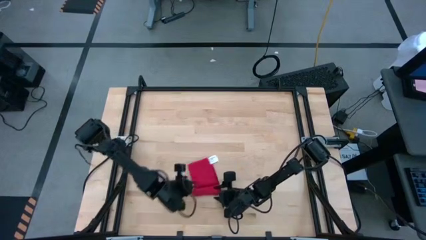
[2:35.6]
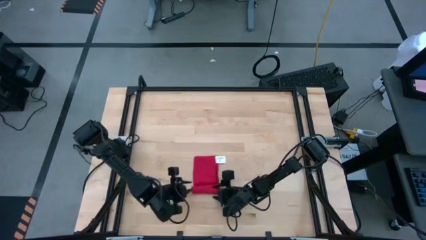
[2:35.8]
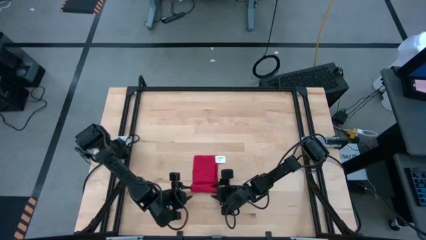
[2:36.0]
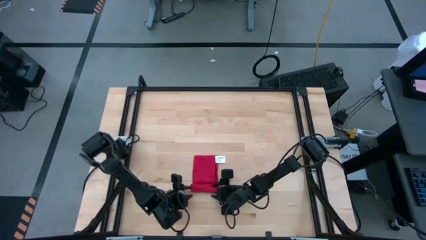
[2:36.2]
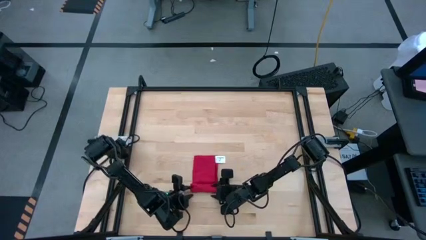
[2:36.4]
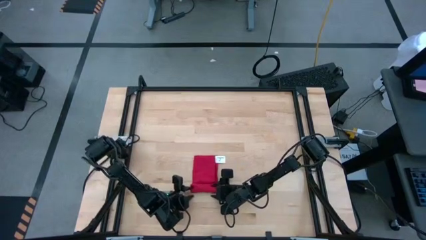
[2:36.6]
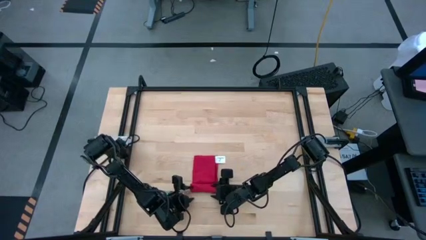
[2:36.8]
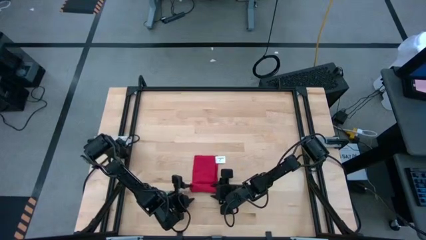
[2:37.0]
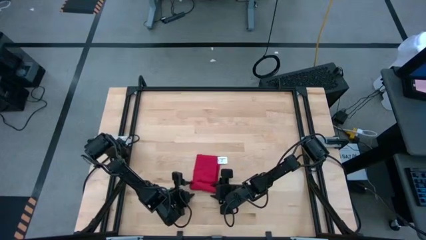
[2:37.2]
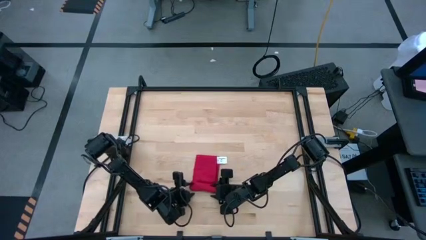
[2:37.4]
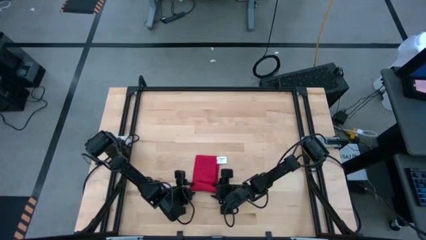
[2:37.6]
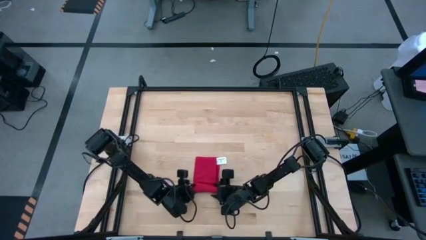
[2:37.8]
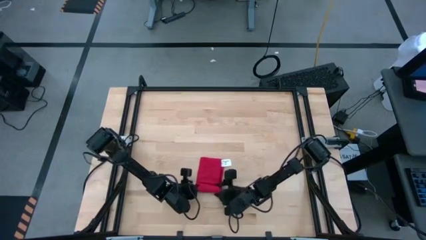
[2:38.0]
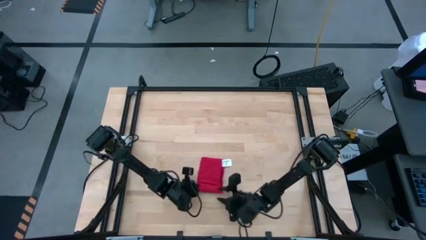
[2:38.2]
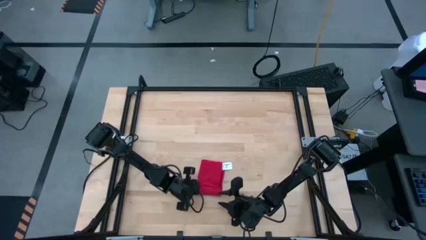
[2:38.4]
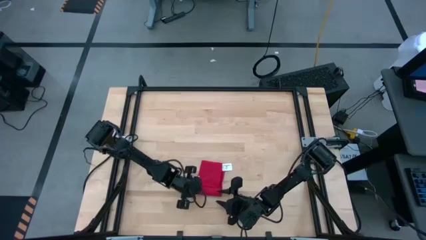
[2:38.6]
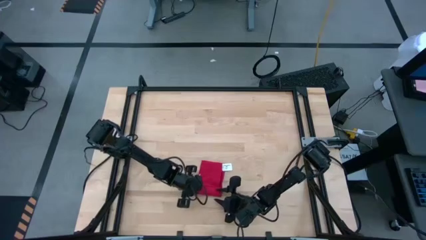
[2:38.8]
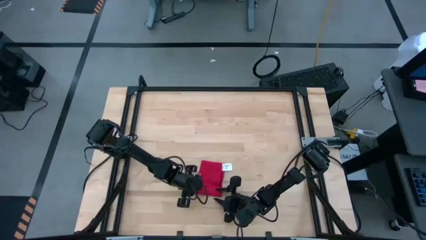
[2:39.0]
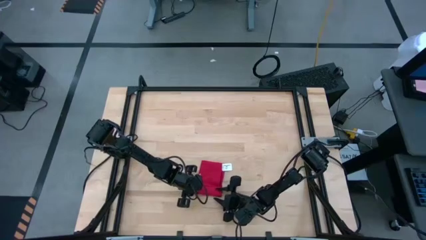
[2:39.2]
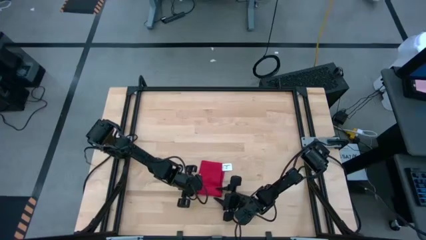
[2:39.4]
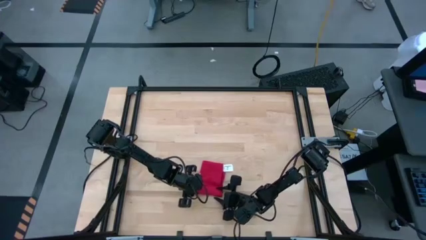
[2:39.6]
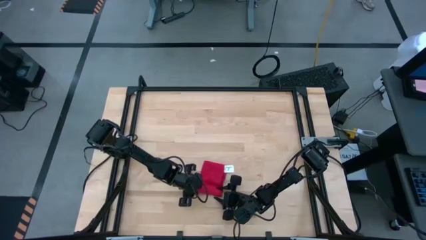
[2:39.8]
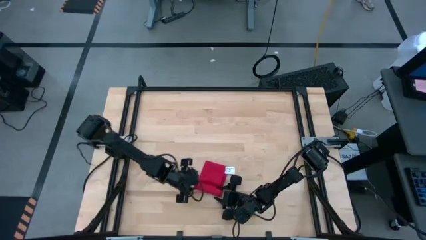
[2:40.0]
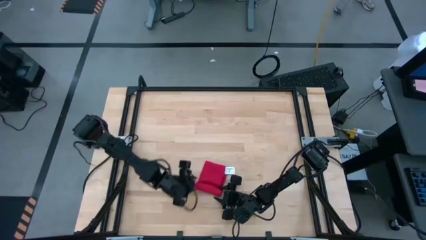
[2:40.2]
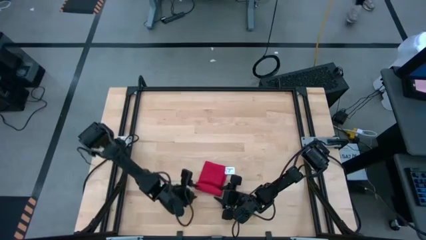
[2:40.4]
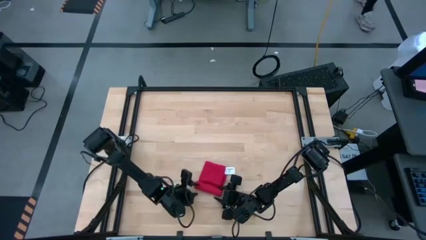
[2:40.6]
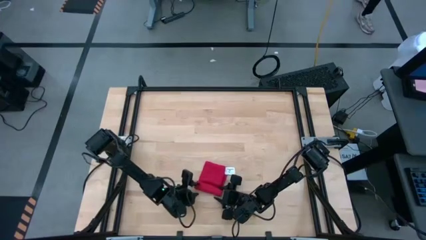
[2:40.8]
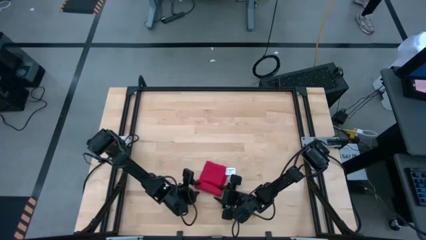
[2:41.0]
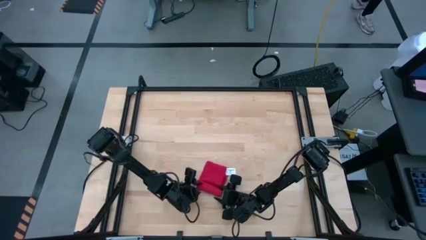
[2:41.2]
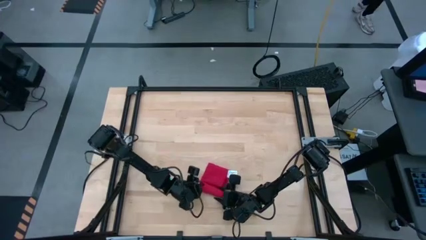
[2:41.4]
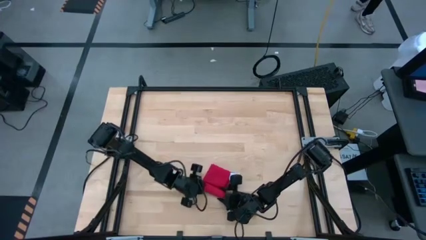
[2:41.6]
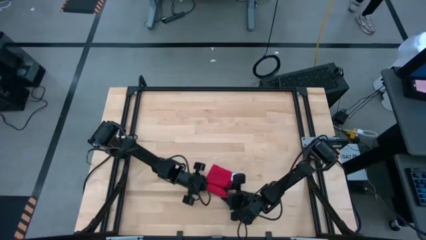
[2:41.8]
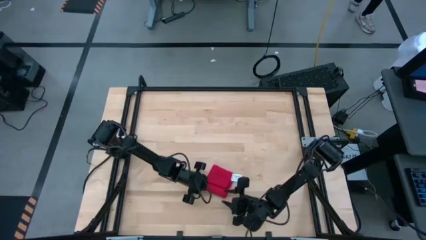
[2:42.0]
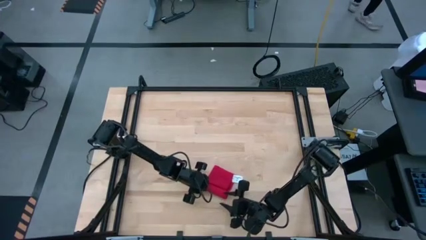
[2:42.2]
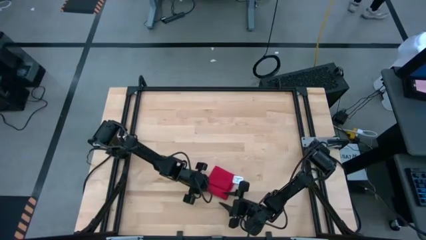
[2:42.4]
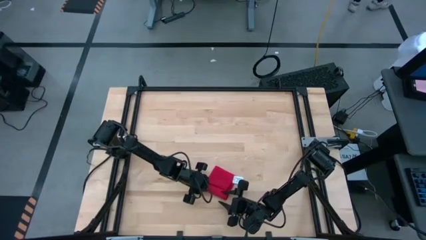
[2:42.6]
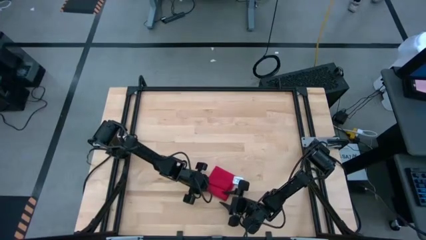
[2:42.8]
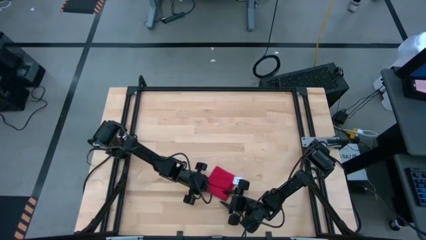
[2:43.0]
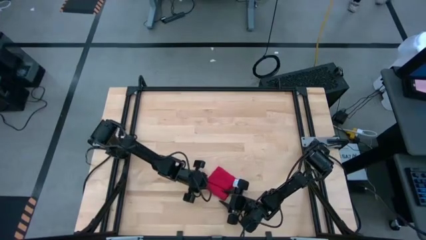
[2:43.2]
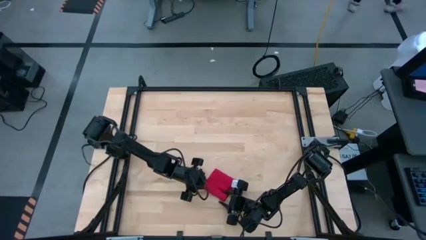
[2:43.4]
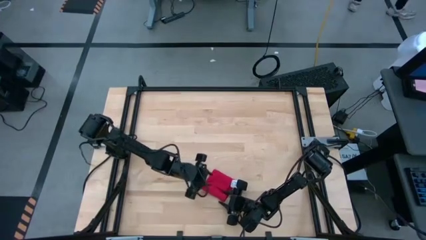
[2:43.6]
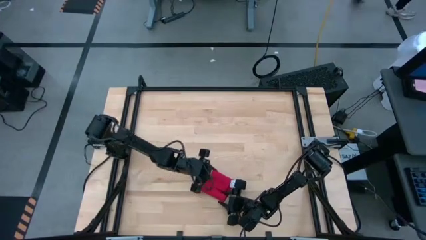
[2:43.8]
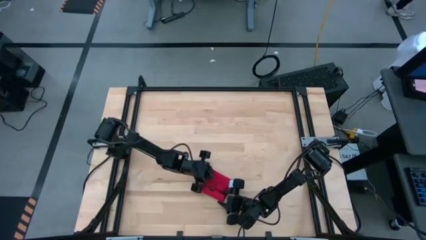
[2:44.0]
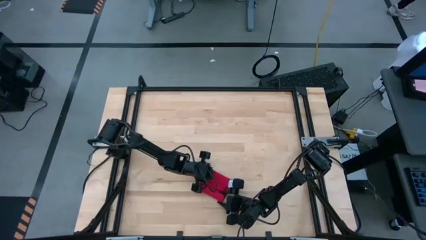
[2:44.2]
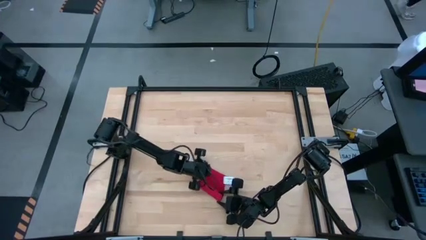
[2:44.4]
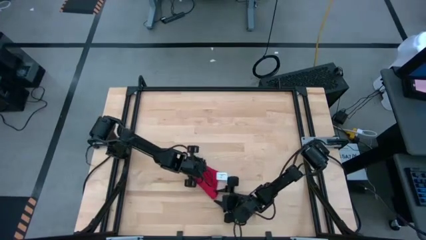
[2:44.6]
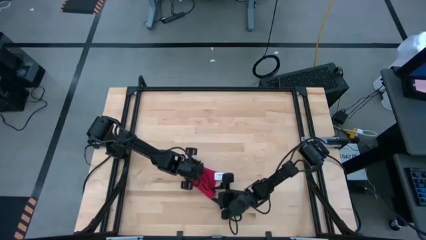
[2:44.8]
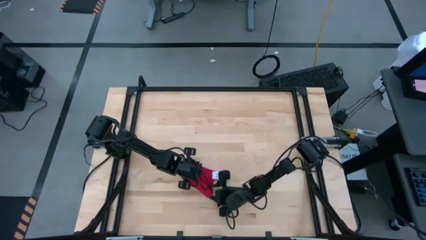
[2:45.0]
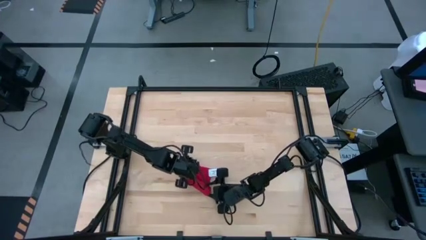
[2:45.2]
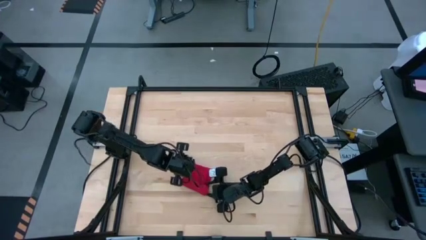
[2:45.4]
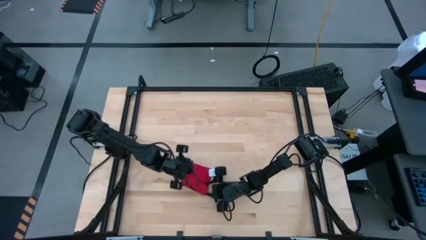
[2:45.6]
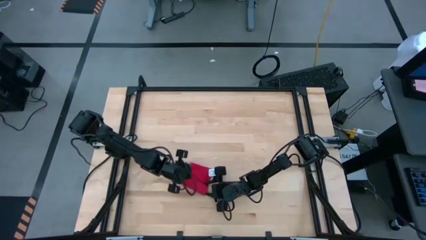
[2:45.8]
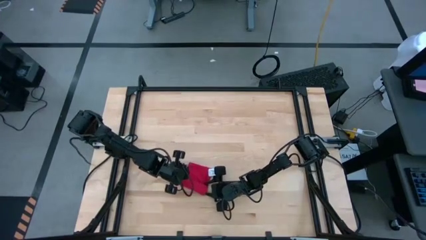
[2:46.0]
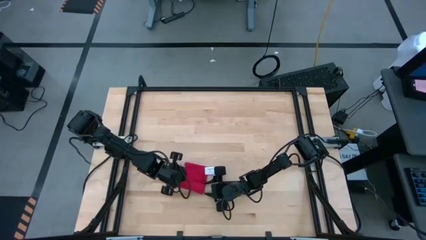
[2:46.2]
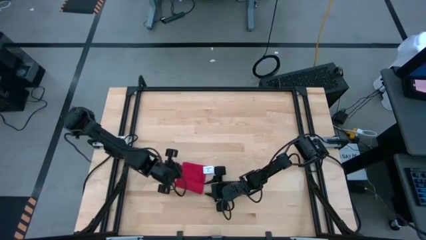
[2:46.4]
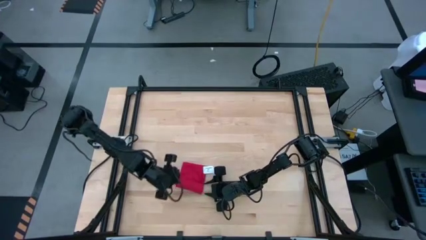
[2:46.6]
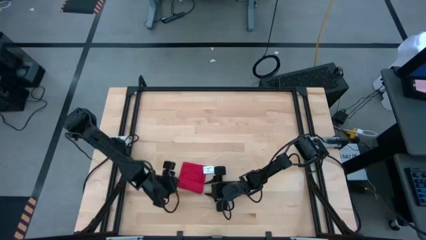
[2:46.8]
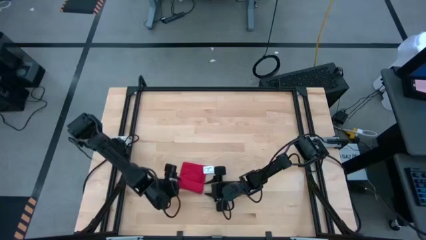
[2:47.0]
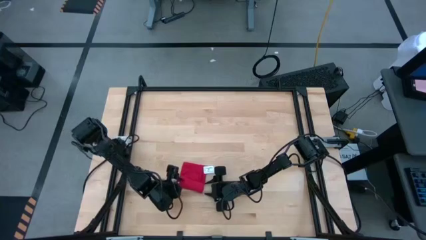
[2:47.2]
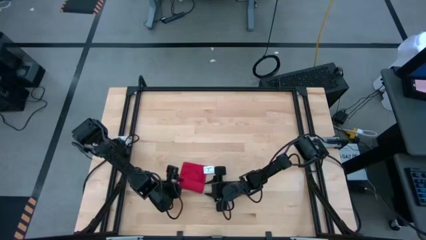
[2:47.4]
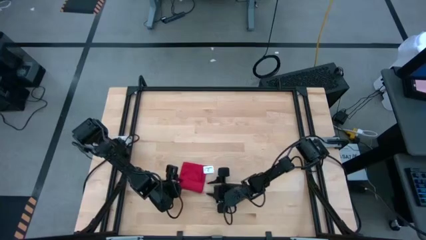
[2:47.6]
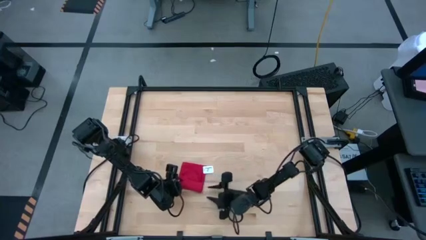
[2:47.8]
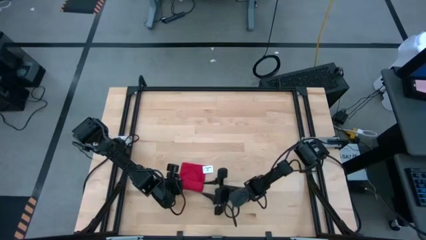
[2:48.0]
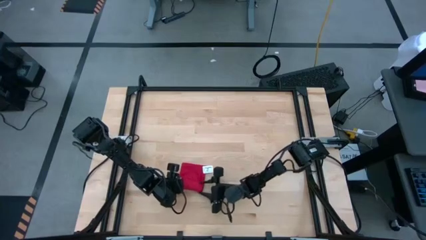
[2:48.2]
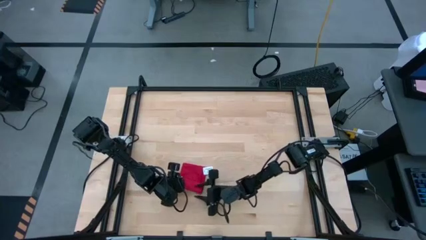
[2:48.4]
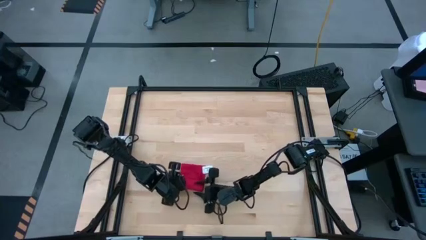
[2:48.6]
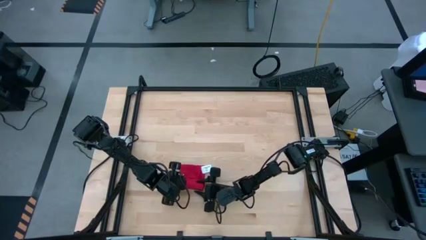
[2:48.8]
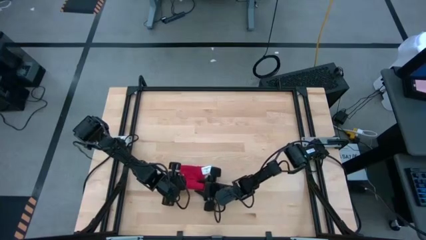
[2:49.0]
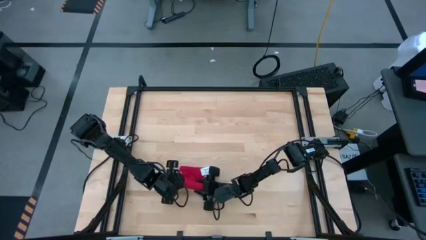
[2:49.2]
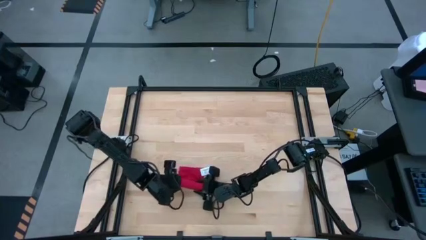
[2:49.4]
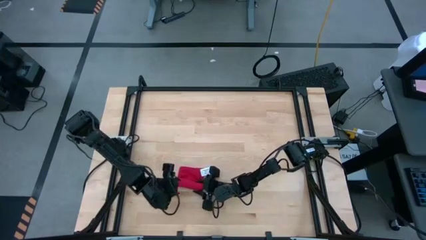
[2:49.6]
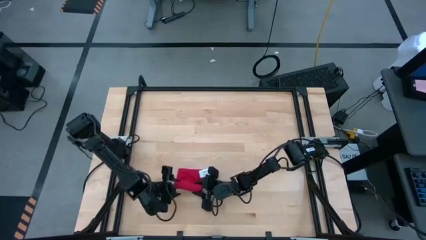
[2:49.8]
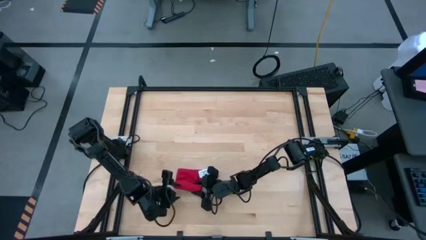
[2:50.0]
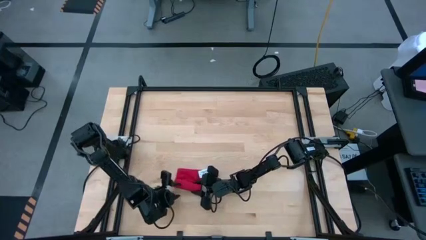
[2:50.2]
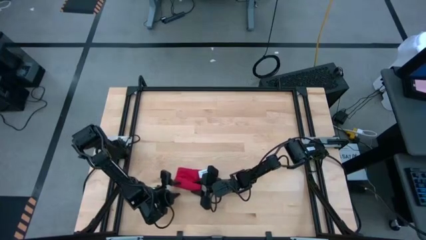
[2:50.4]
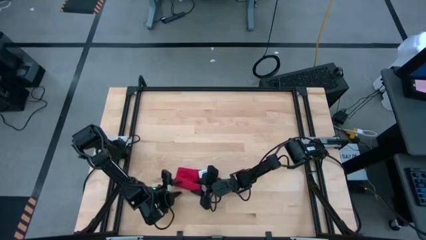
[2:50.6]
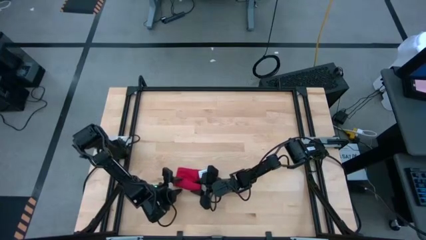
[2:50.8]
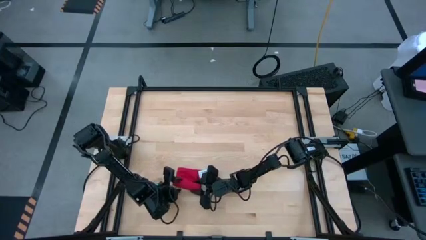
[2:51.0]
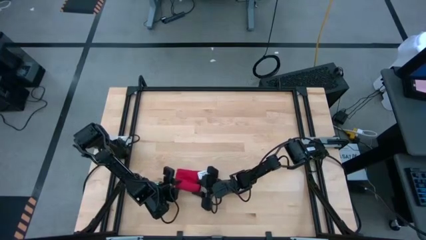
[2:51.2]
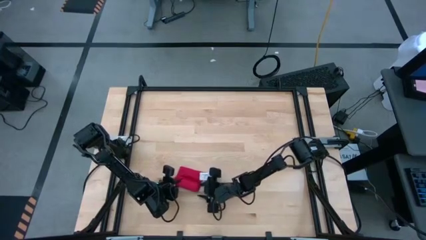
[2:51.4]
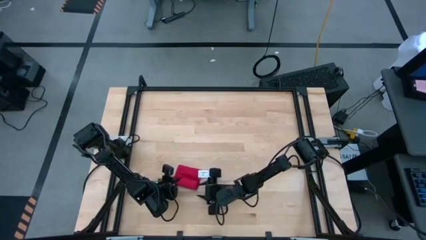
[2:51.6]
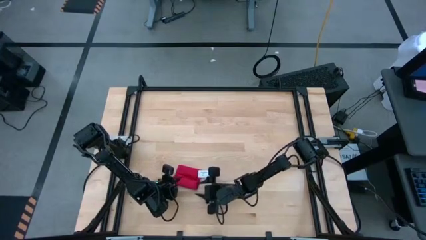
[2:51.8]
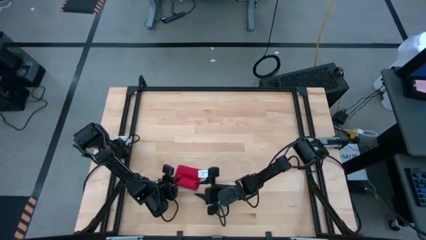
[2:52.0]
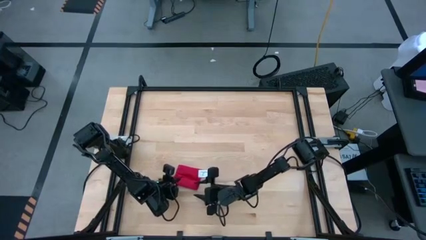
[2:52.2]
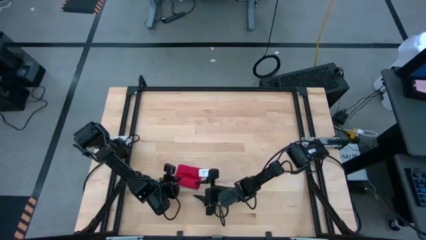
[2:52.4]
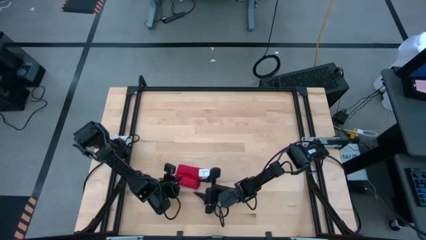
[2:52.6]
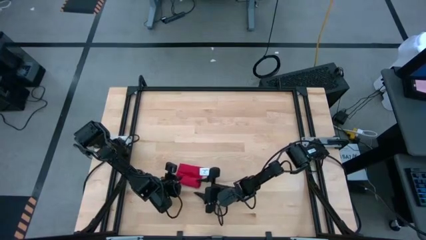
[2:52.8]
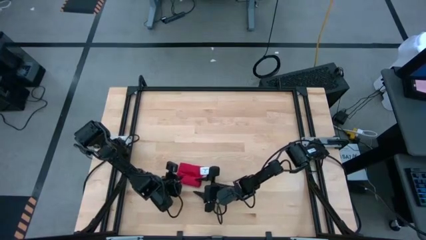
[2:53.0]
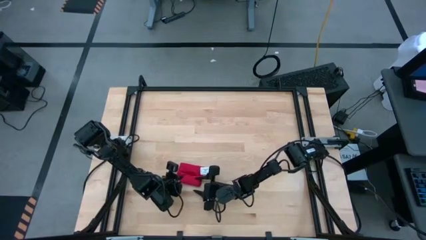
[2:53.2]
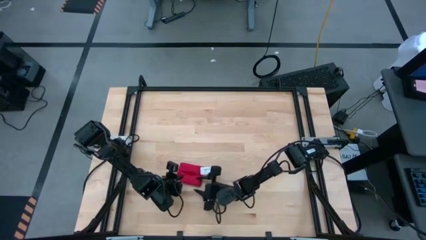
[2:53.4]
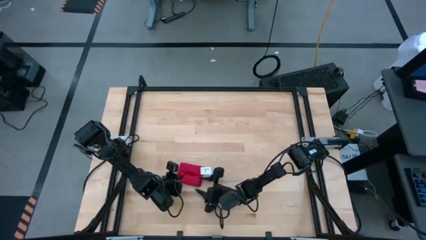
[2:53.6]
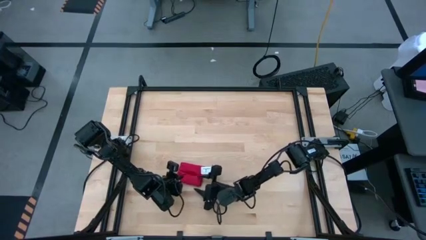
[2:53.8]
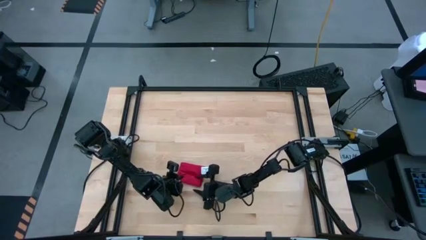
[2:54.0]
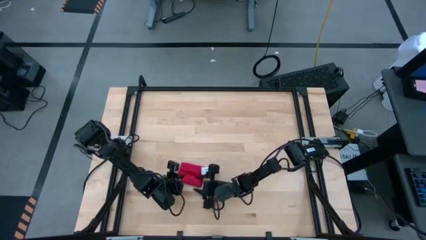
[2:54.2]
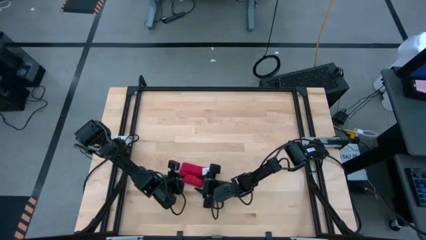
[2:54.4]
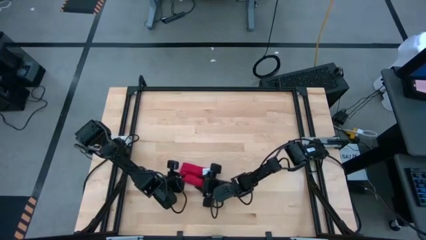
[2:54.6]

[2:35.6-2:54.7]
Task: Roll towel
Roll the red towel
